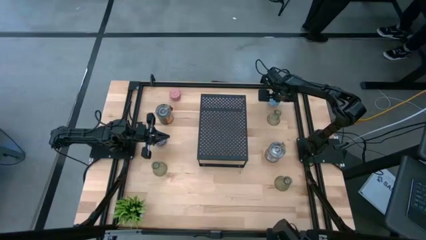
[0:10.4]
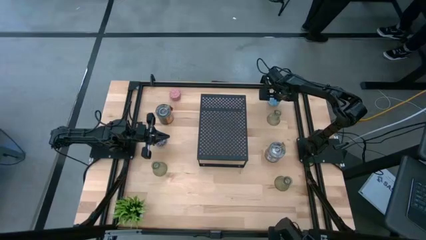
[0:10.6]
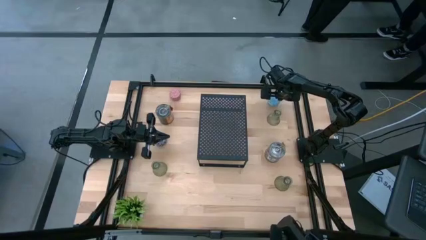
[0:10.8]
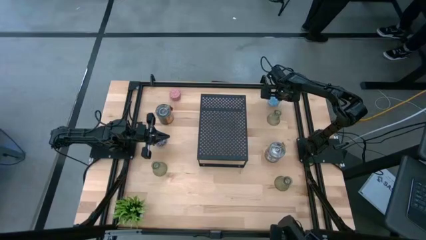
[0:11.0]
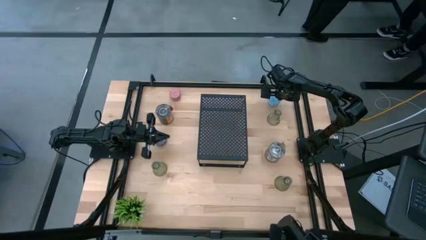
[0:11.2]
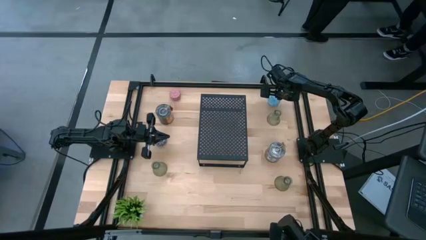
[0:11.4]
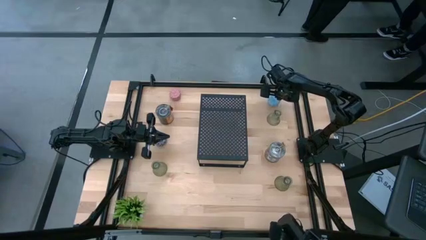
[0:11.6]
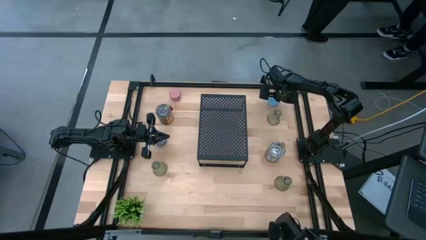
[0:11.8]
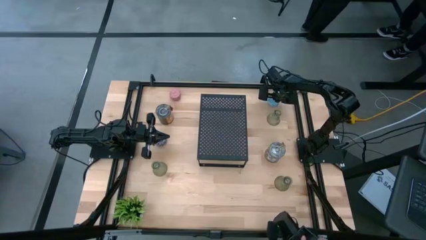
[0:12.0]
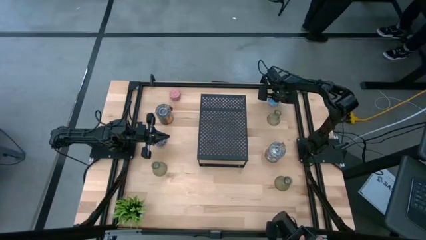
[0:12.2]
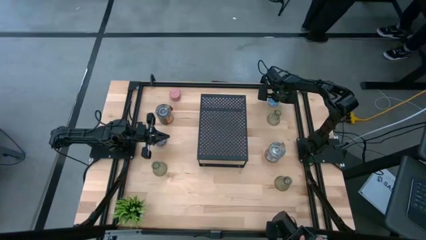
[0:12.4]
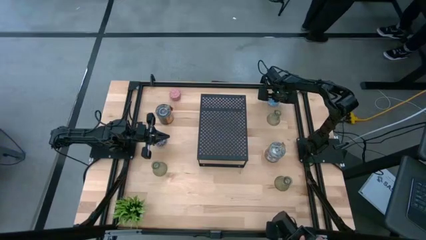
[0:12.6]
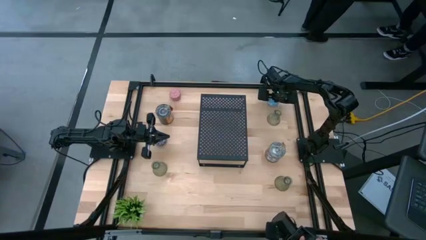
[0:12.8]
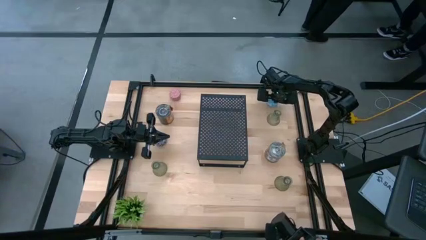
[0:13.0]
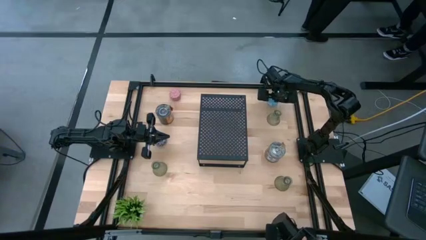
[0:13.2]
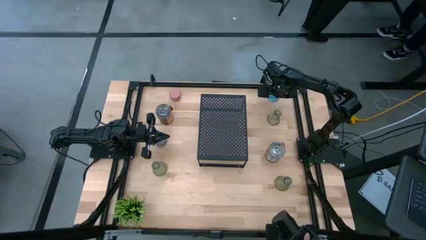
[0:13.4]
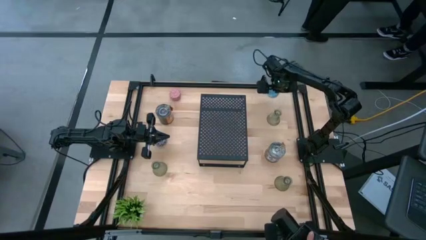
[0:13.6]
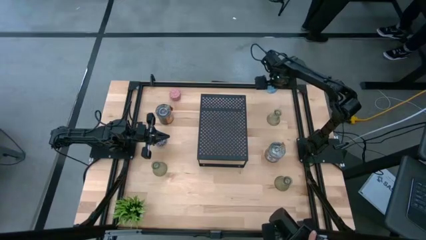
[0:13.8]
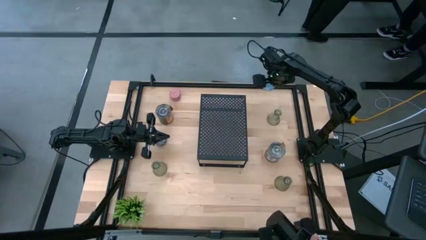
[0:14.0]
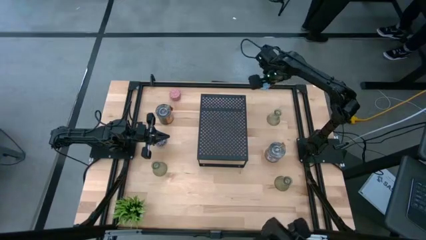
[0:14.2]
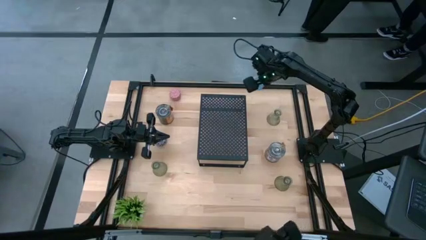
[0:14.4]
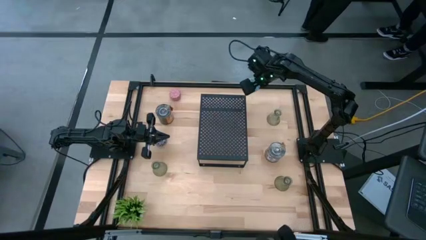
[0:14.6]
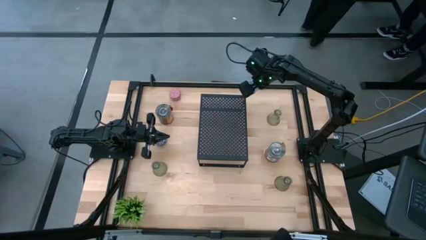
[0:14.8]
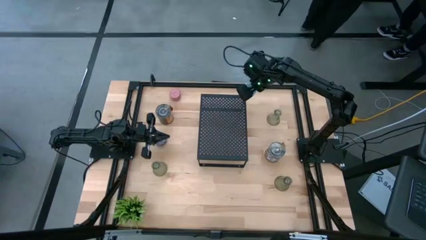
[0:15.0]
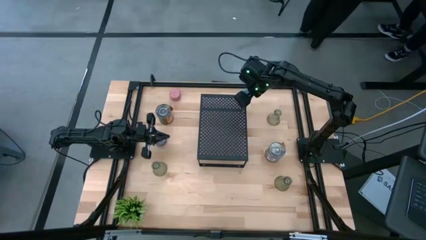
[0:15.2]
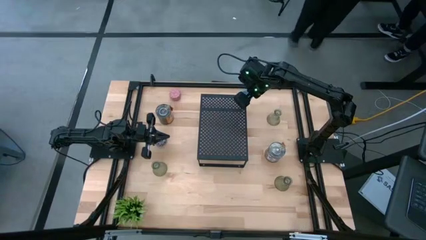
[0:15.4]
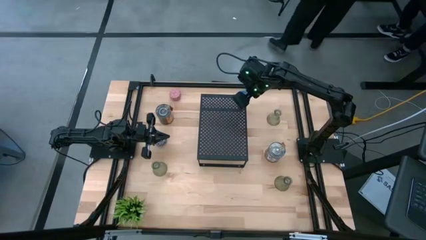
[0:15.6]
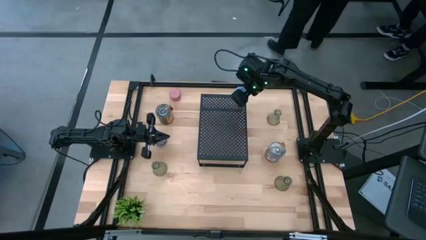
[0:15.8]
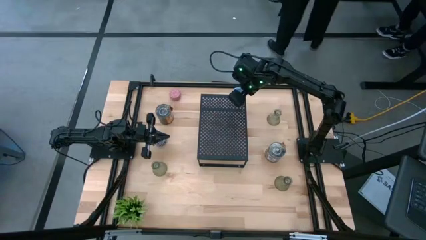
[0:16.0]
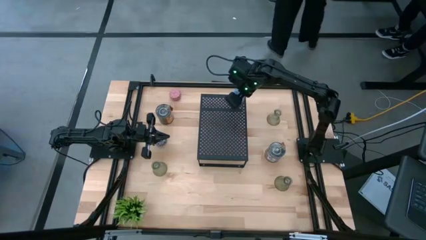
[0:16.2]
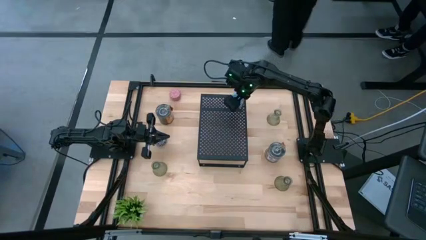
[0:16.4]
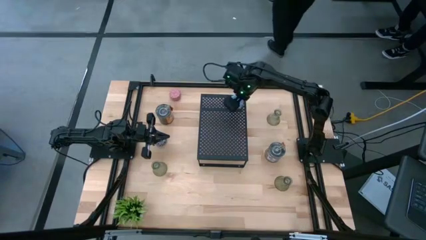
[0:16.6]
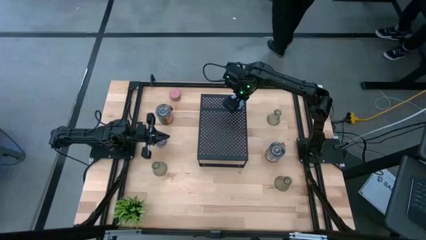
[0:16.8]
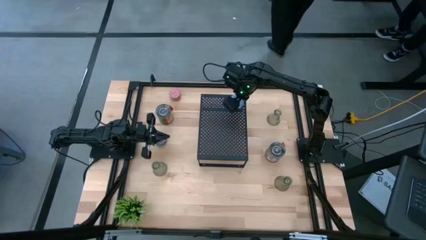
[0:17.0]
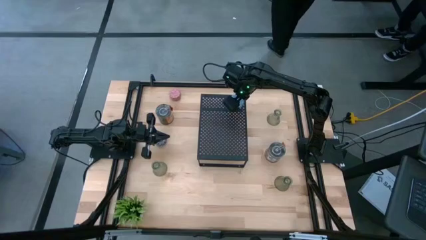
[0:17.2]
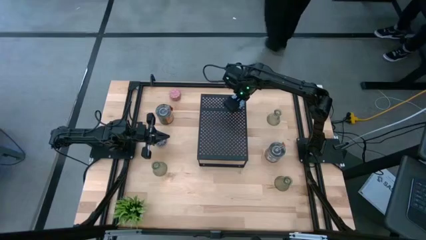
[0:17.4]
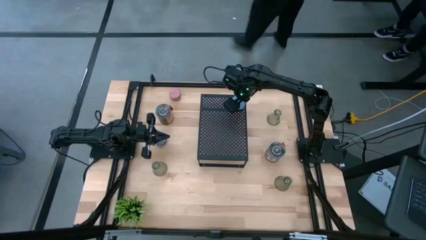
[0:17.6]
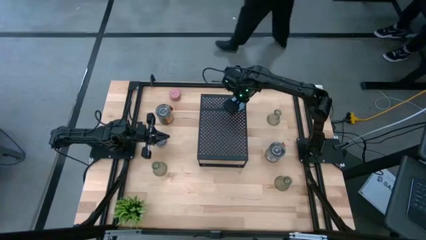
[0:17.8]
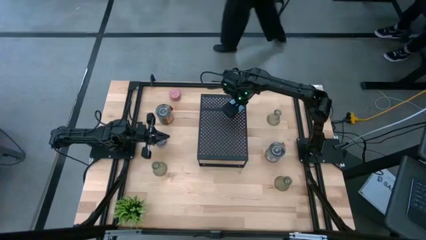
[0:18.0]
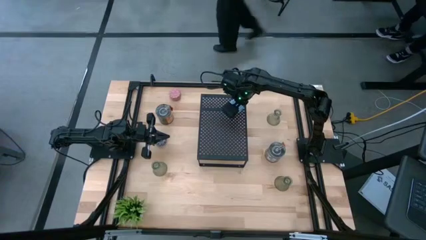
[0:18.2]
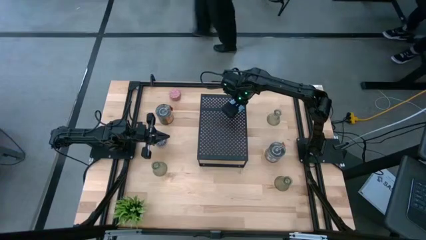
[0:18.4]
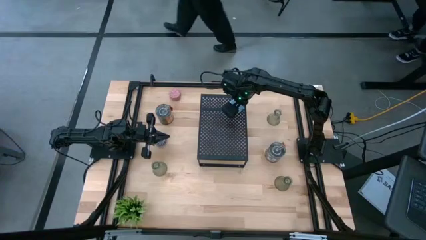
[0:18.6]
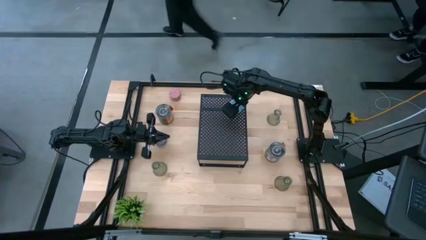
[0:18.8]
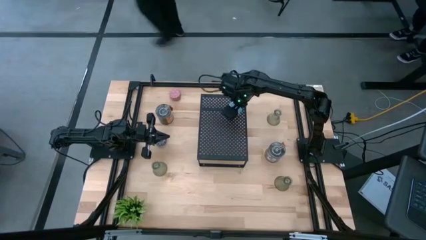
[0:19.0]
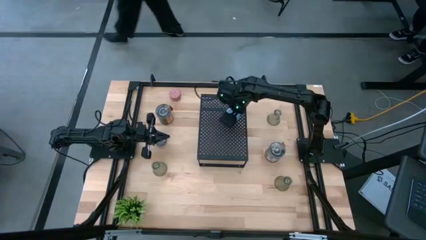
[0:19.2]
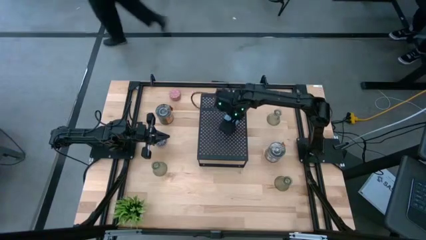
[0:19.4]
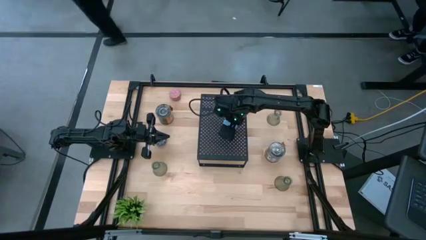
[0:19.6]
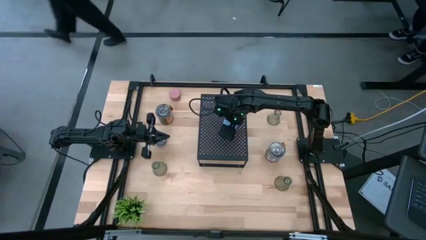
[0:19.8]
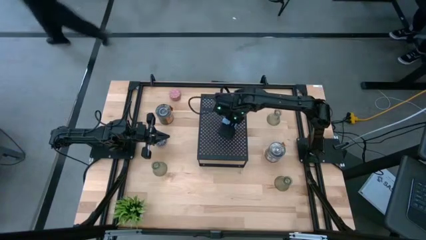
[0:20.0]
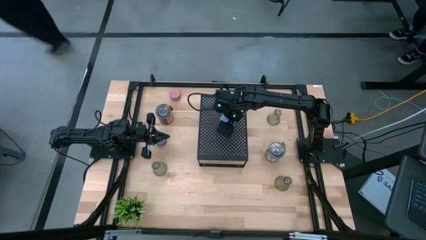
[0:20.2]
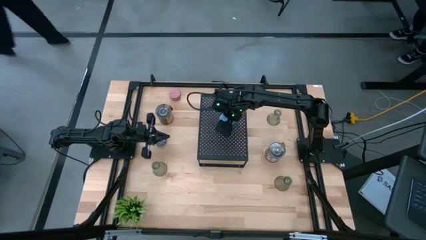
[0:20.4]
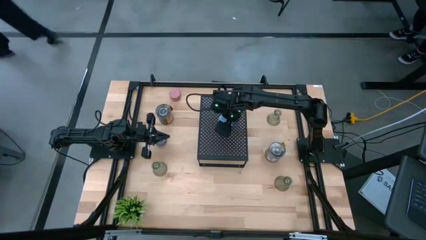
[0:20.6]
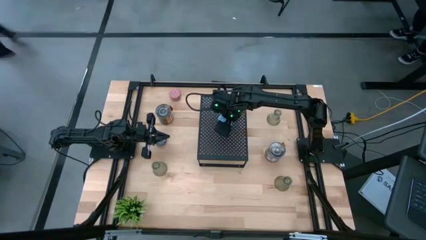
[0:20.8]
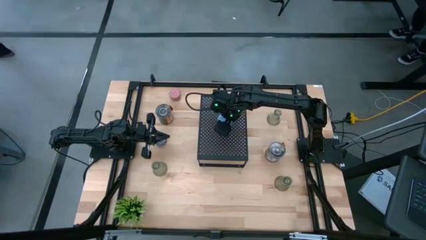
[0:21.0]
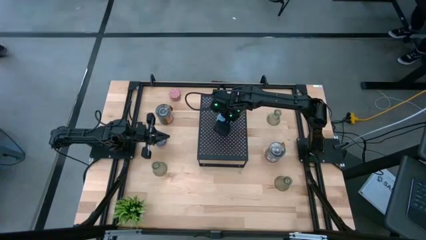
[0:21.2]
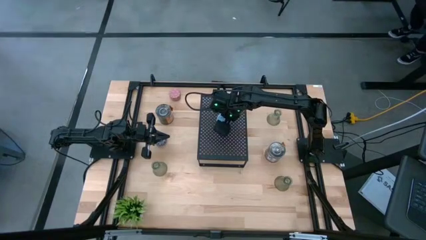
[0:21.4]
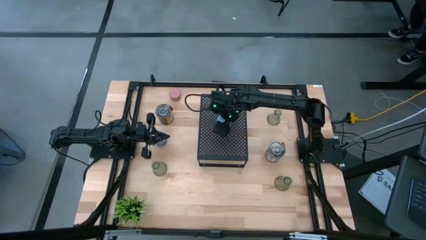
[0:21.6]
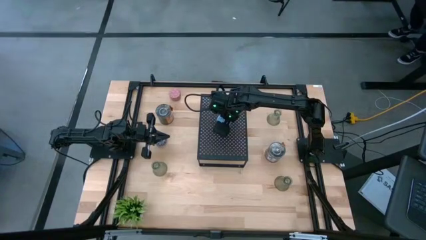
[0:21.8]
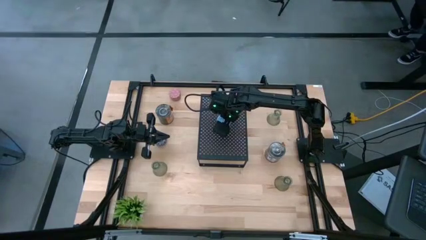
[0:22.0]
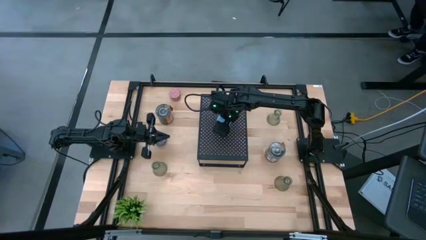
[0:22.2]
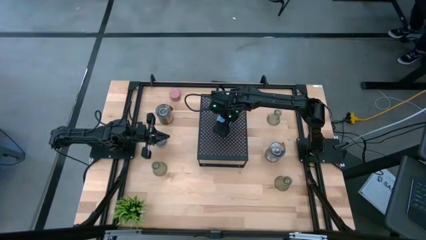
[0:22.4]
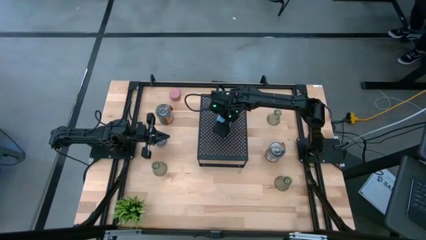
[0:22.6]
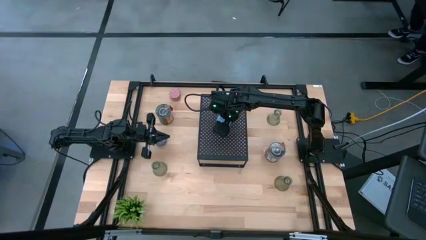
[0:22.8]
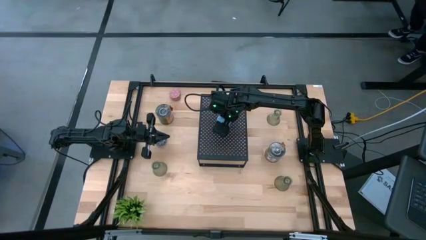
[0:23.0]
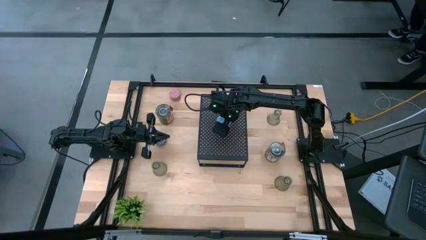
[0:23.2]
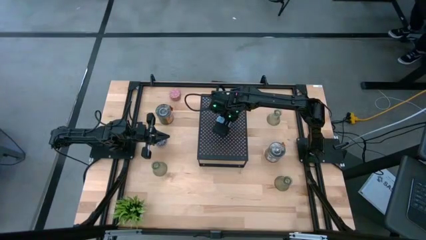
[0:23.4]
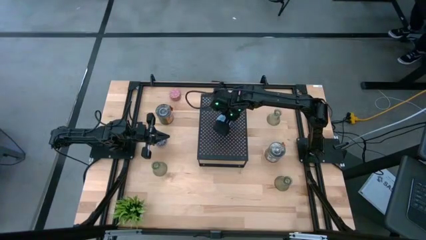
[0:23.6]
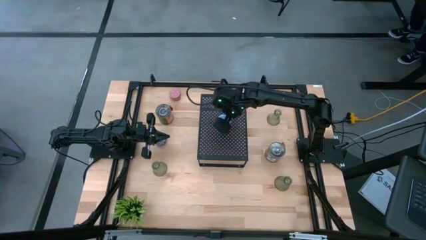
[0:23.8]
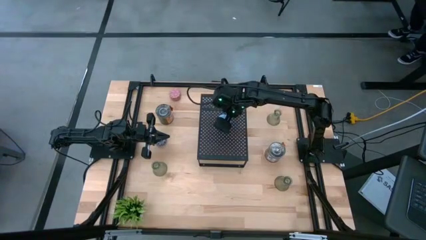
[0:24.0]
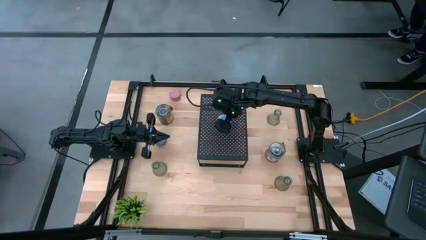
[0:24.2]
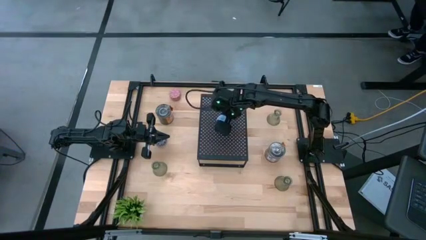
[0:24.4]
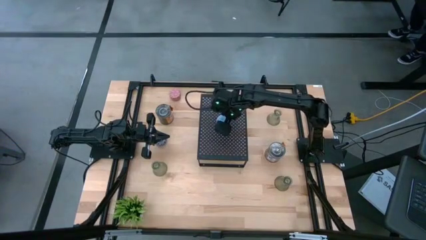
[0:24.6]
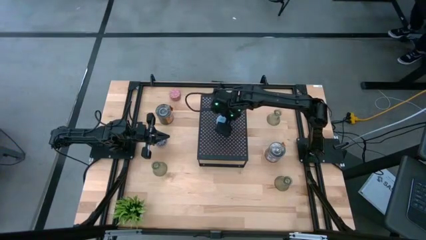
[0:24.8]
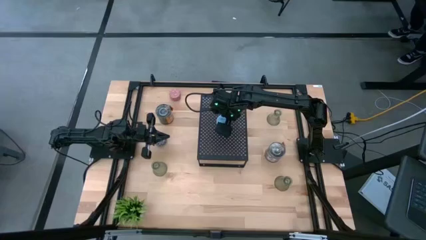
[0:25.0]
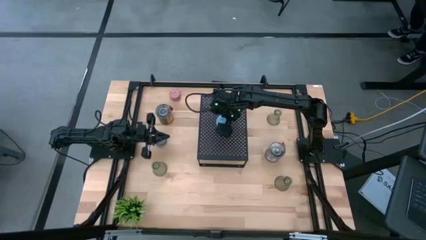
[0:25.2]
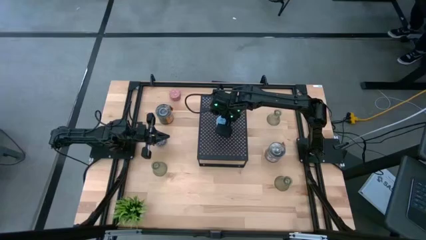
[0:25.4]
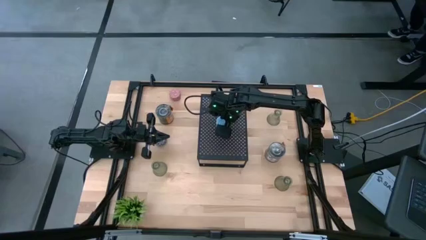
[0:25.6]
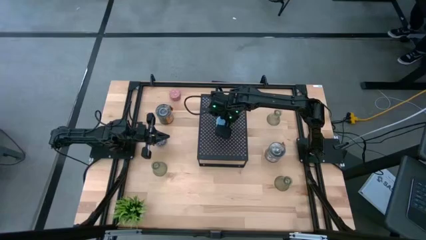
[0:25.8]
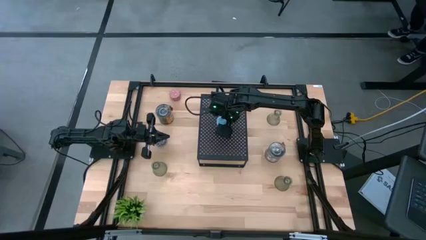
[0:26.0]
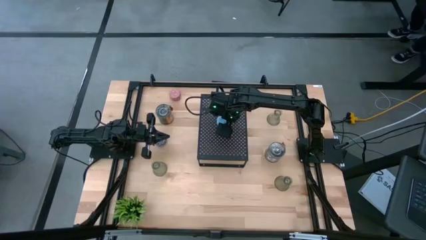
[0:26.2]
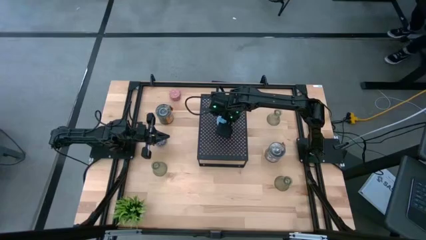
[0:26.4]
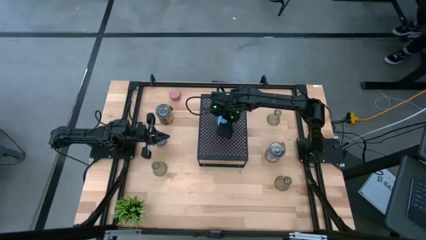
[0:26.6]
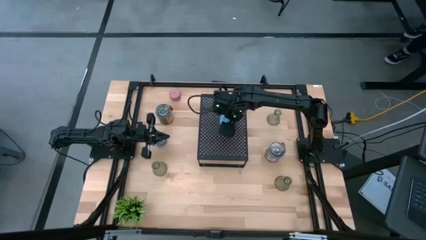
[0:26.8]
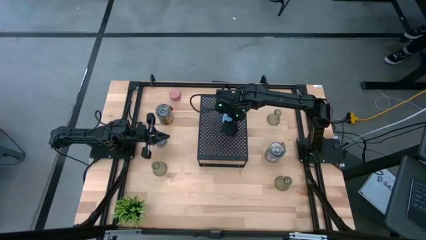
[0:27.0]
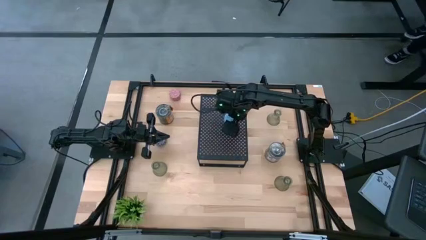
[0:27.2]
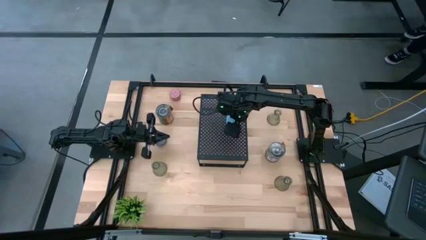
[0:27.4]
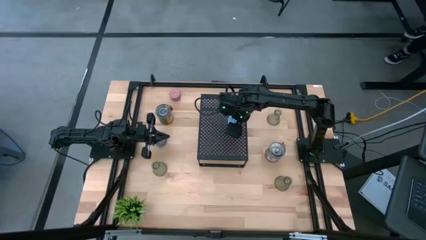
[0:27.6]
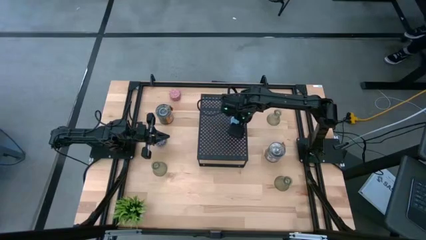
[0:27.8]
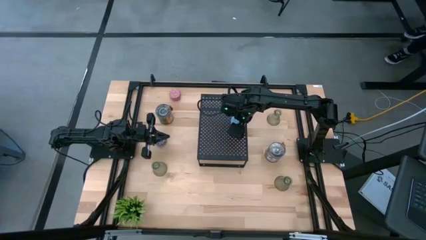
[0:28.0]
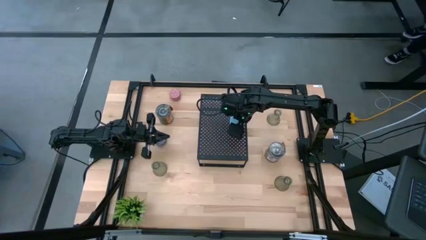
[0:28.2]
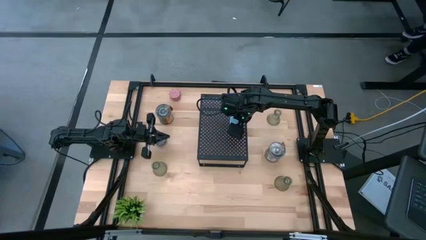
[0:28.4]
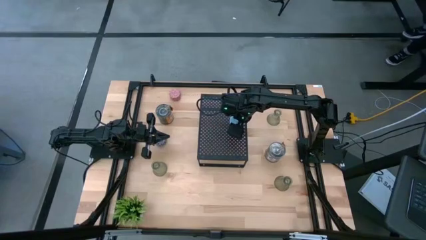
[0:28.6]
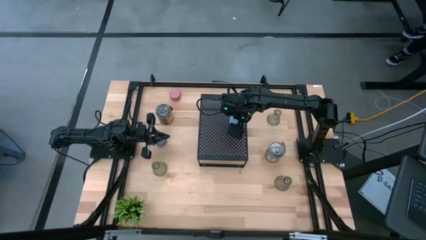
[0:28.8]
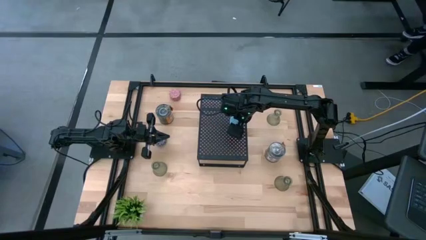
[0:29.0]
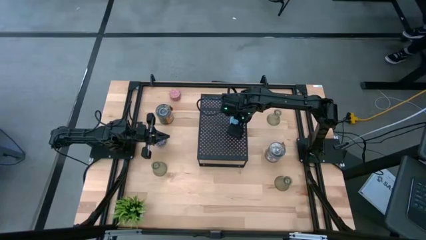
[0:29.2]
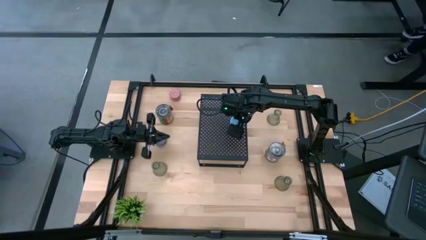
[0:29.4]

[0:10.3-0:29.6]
Task: Pick & Place candle stick holders
Put the patterned blue scented candle on the shelf
